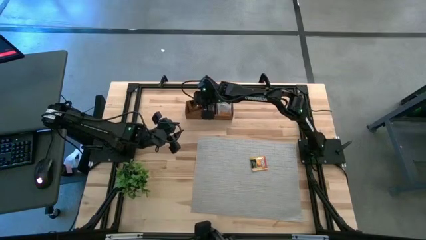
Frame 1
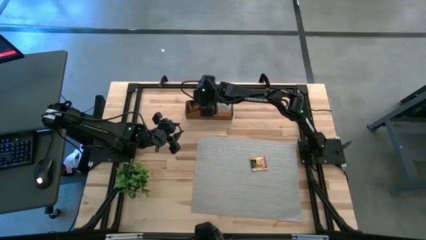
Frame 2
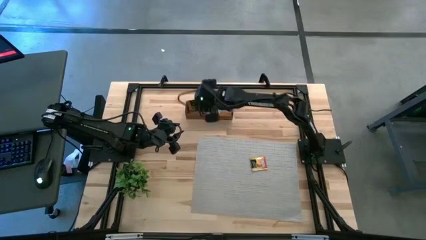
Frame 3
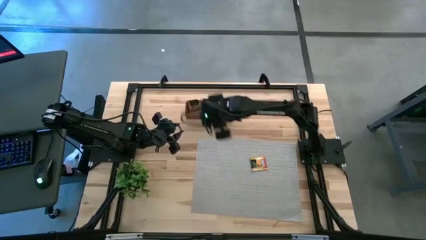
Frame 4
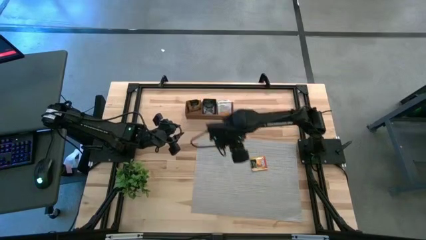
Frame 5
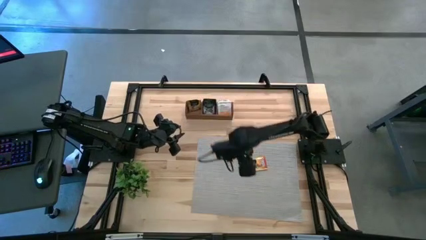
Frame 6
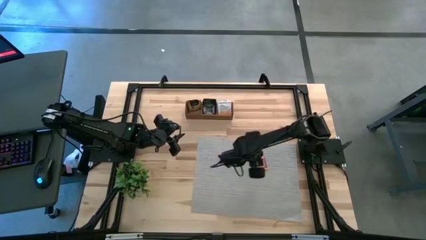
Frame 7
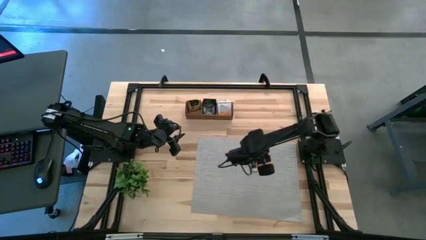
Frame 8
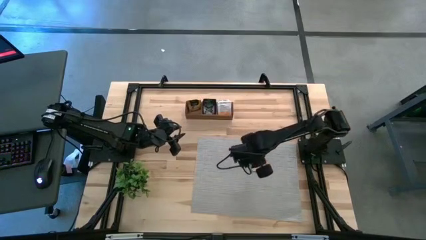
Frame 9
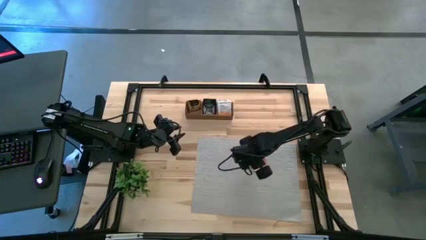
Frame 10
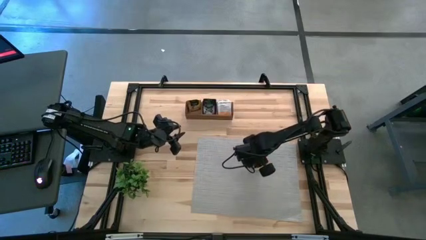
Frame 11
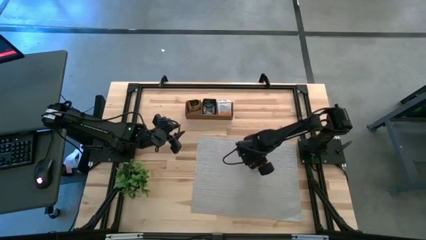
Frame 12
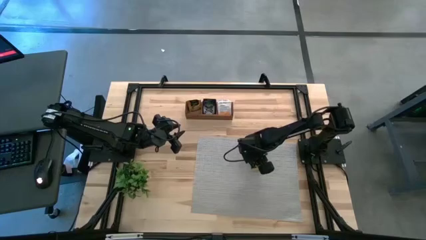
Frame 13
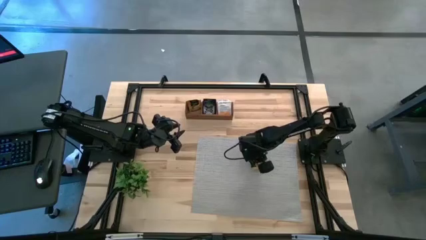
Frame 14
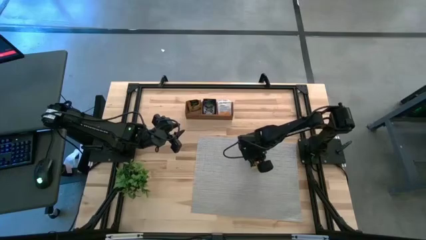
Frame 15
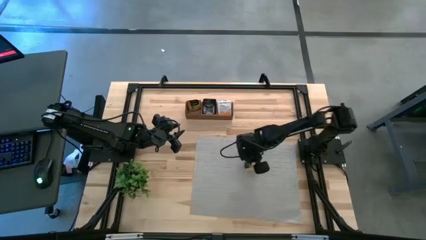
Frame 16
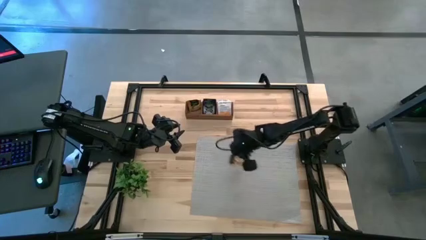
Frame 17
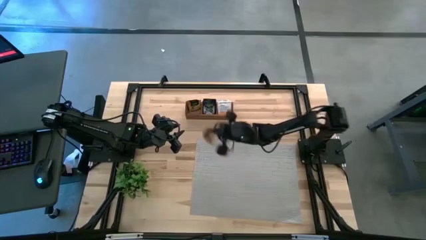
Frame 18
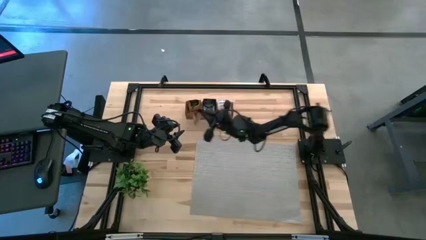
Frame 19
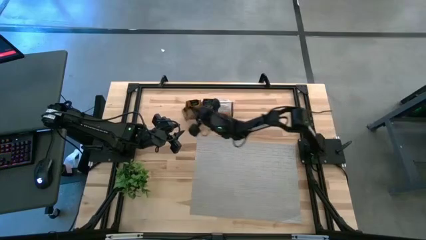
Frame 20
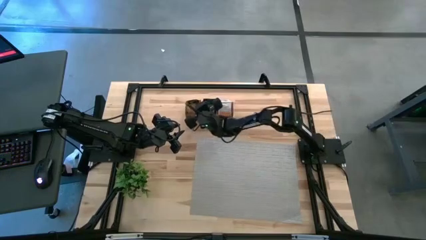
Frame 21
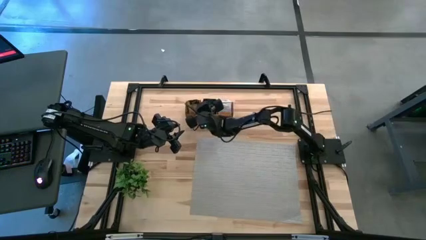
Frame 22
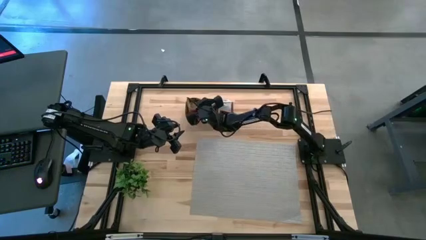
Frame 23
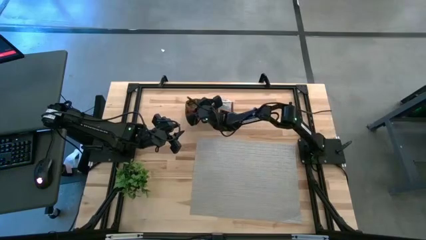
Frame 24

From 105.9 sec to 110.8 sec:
Task: Pick & Place Tea
Put the orange tea bag into the left section of the wooden organizer

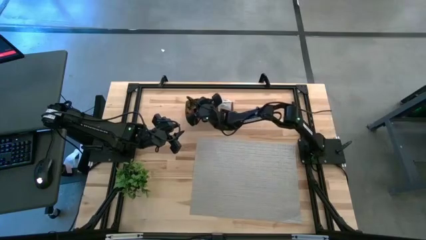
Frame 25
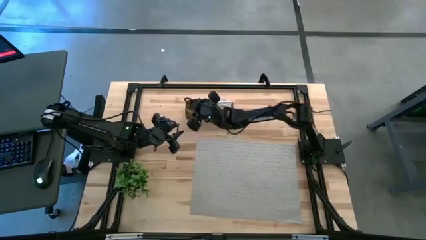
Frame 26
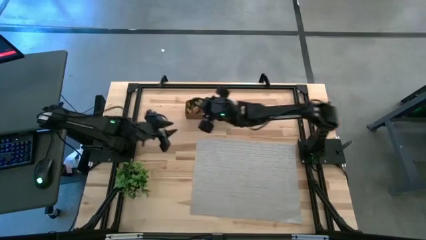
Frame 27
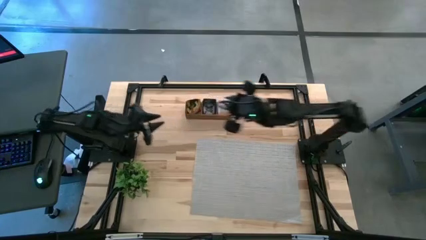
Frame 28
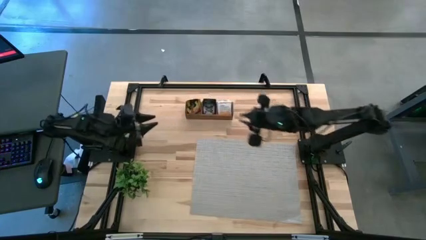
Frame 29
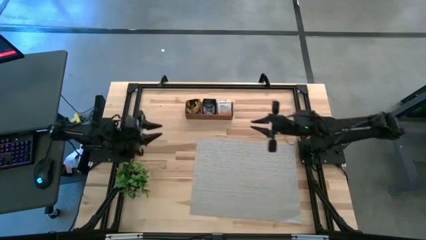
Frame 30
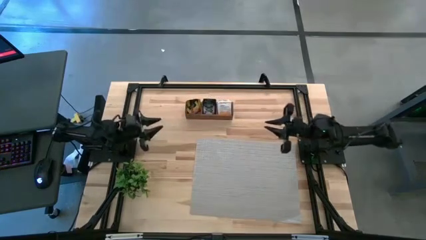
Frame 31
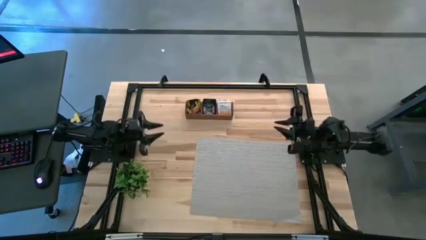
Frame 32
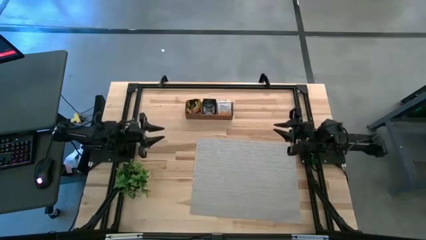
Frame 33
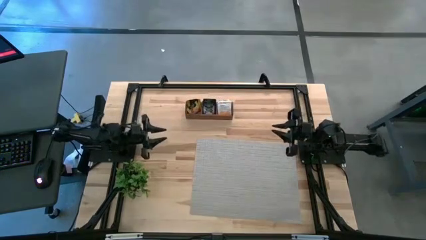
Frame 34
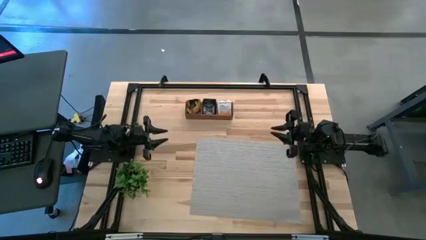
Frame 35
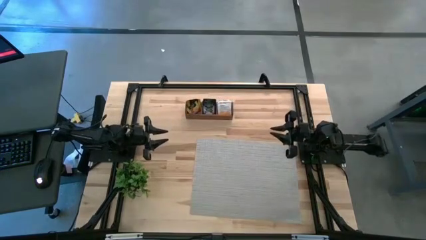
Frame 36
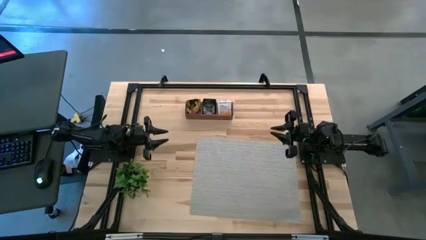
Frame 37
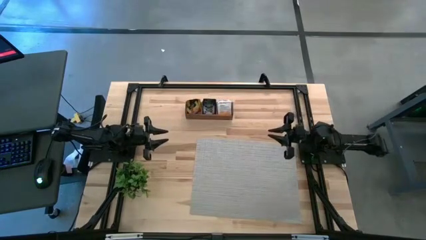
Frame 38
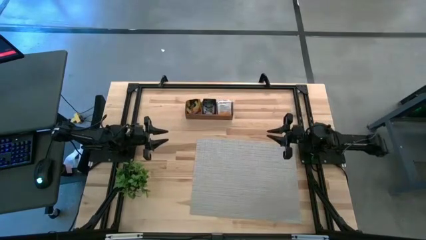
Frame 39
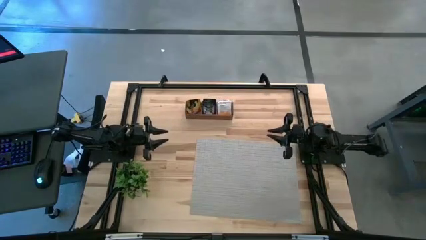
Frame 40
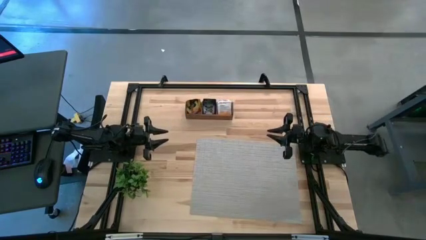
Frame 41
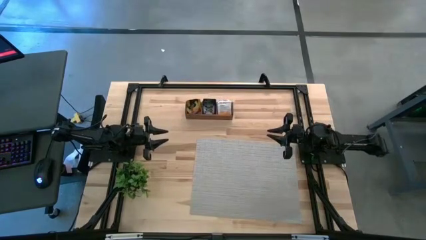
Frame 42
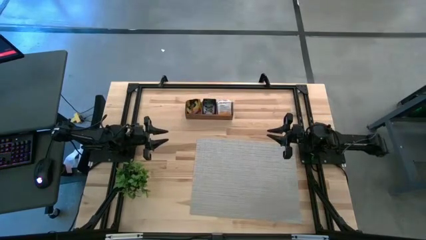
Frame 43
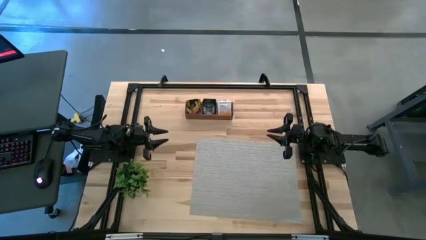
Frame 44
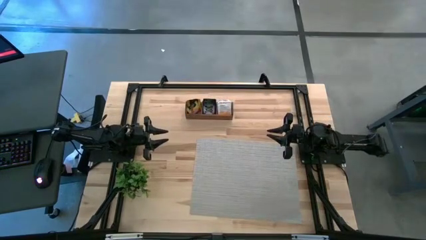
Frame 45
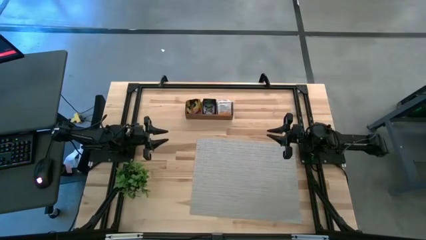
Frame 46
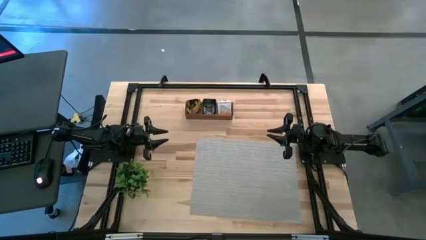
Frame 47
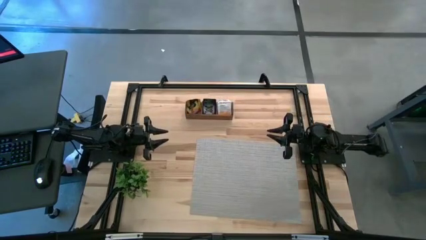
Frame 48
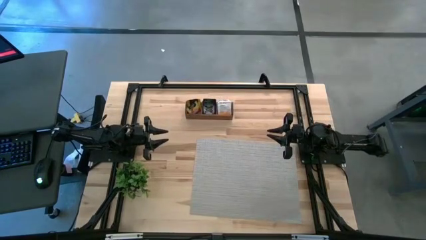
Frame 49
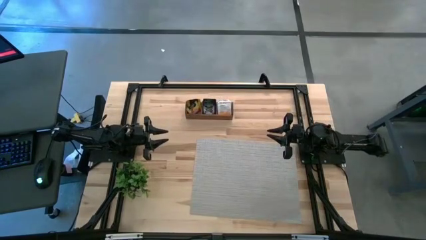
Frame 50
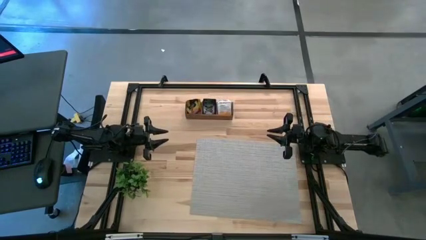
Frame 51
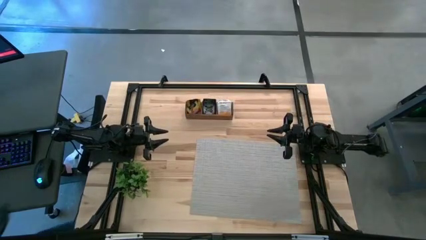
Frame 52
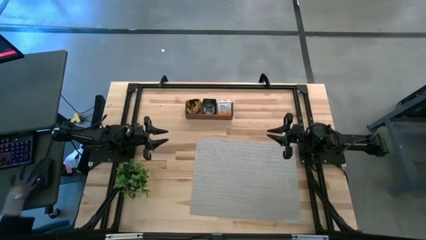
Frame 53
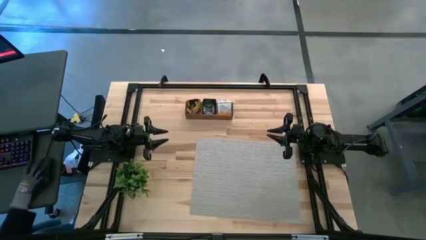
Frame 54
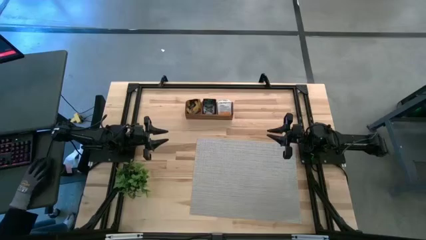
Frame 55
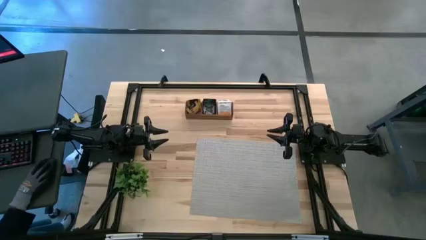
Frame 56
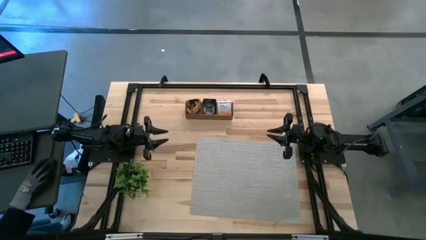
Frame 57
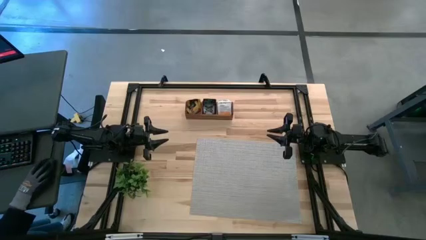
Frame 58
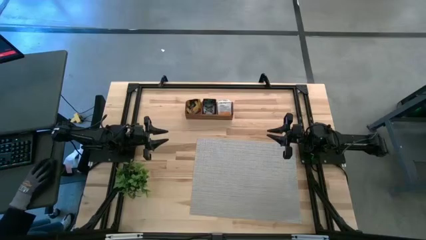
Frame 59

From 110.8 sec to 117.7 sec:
Return to Home Position

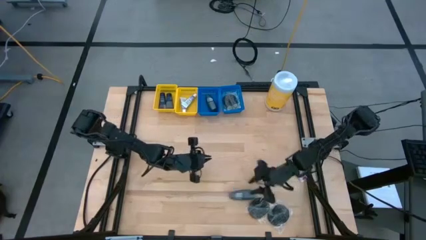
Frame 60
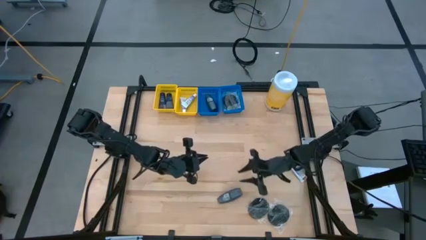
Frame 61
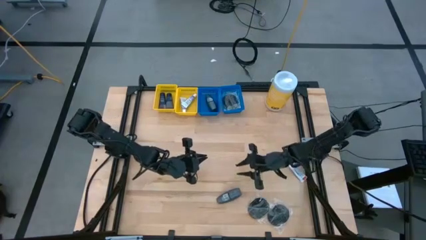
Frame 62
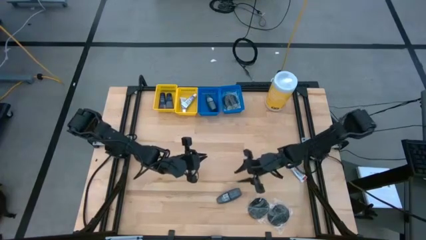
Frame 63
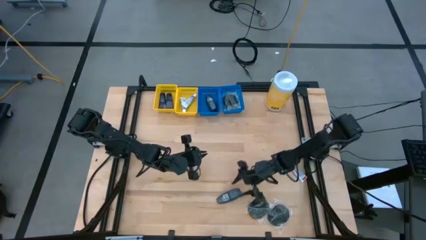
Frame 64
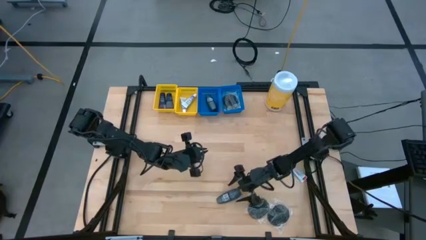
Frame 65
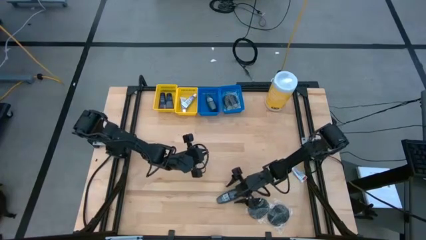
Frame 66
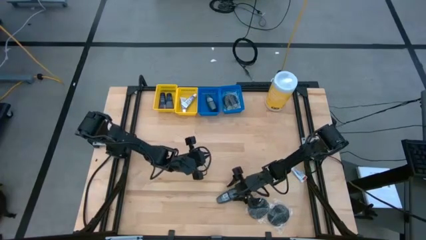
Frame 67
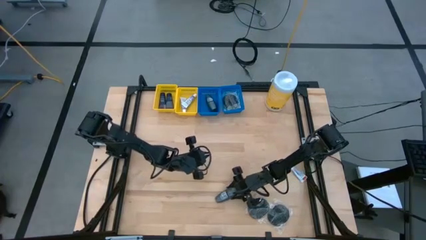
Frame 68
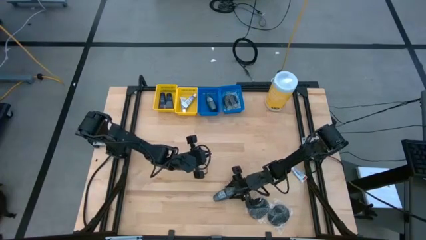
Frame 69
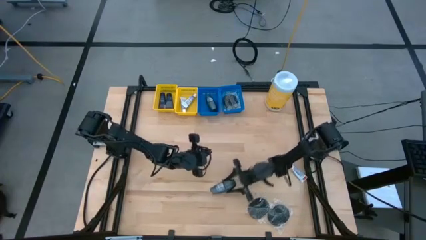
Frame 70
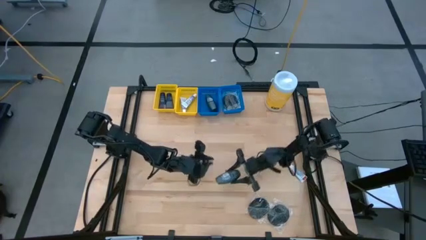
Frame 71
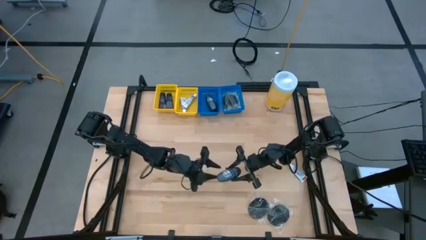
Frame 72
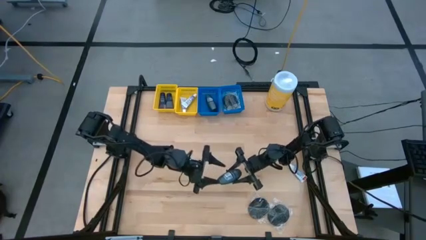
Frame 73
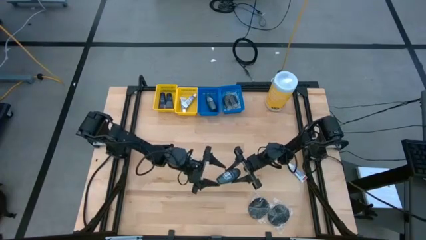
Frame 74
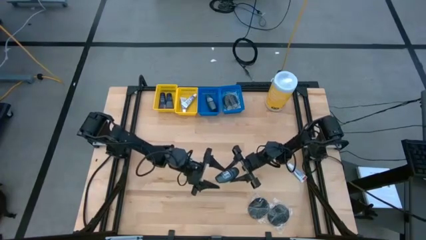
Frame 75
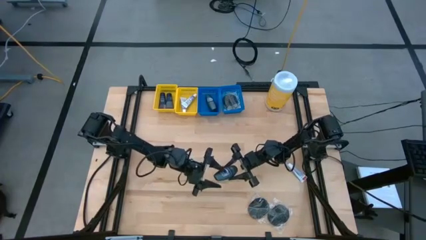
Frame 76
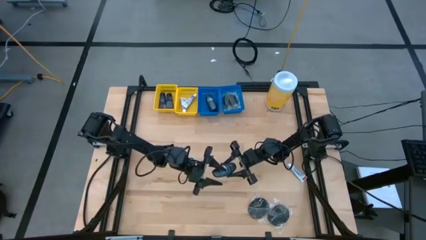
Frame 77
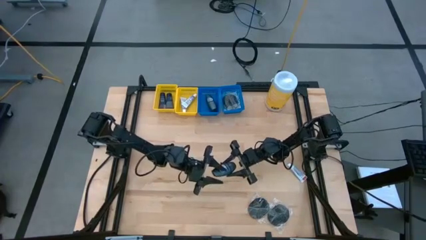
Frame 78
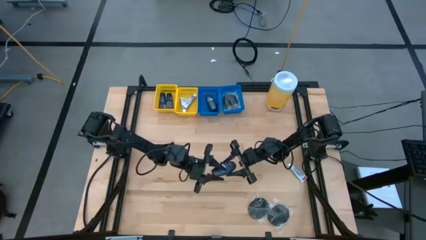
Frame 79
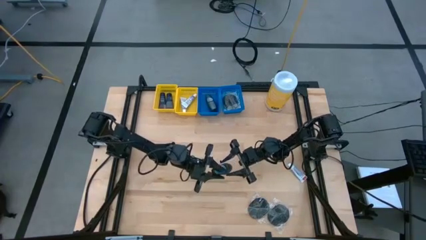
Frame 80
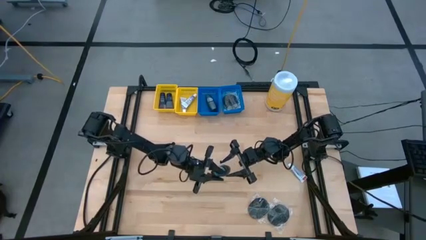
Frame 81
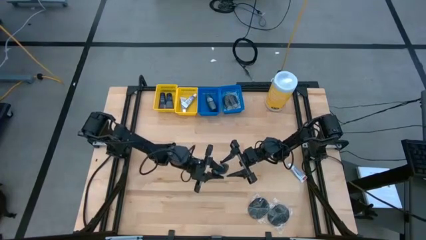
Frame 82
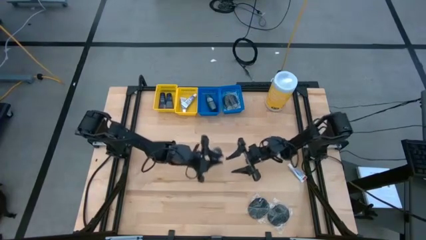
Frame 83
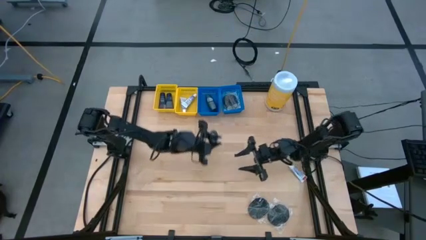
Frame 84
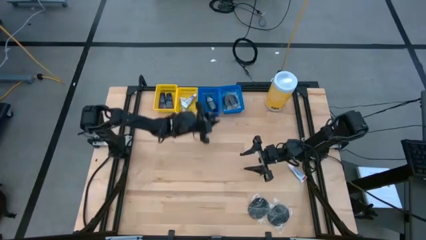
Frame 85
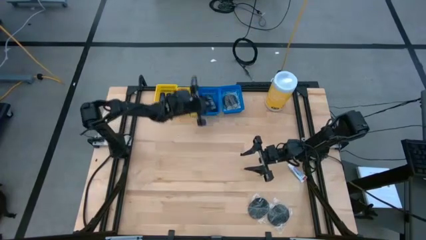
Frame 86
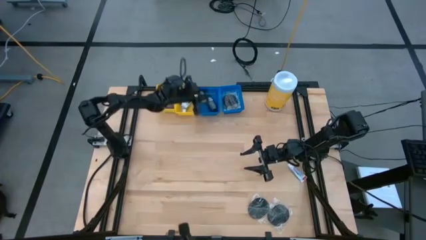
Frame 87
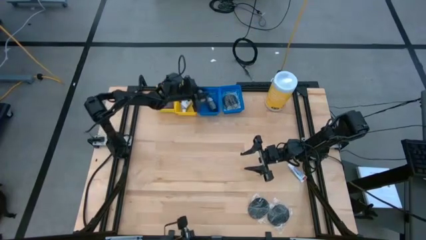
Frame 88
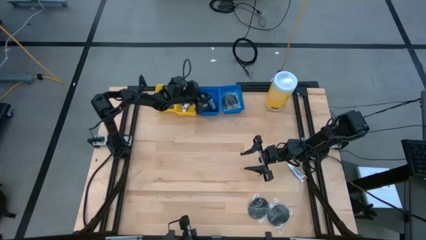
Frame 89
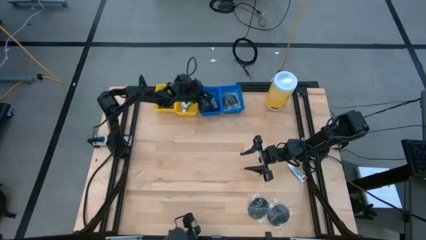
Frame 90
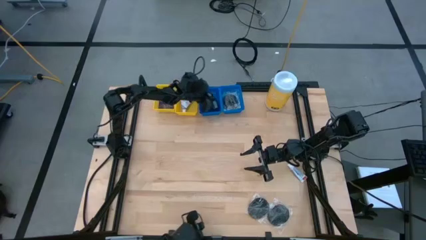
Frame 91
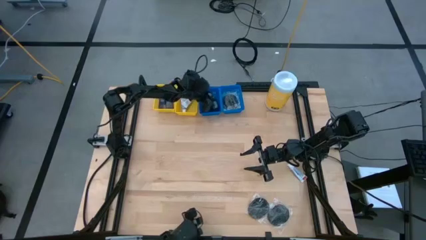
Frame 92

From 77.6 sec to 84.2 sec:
Task: Pick & Place Travel size toiletries
Put the black roll-on deodorant into the left blue bin
